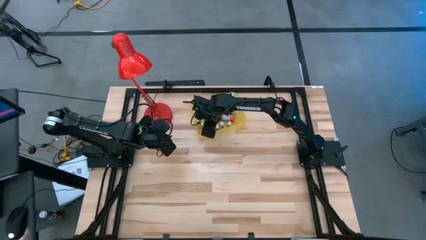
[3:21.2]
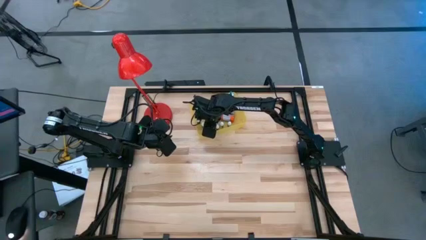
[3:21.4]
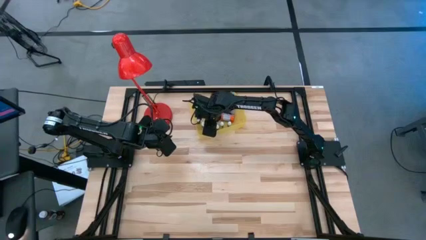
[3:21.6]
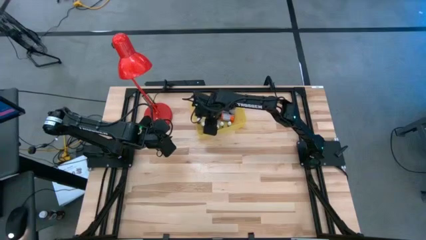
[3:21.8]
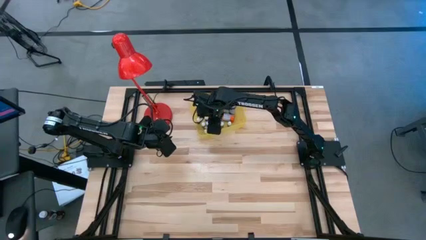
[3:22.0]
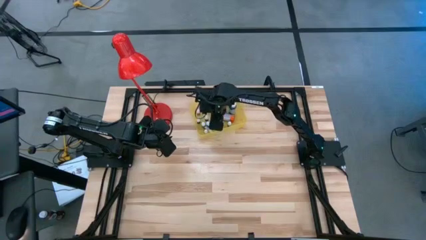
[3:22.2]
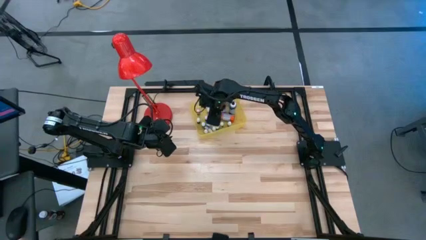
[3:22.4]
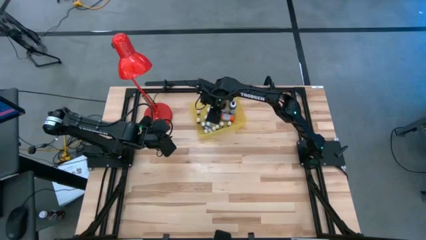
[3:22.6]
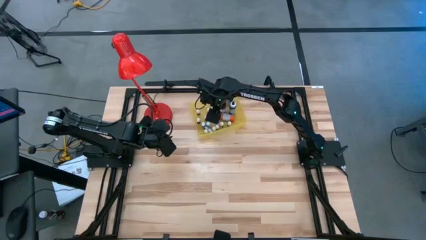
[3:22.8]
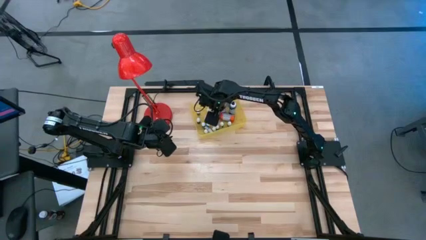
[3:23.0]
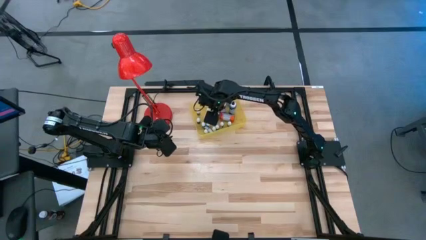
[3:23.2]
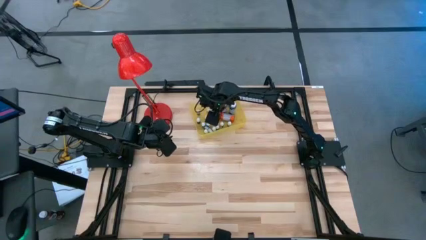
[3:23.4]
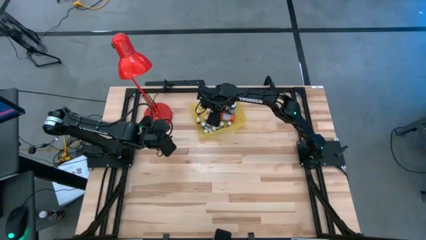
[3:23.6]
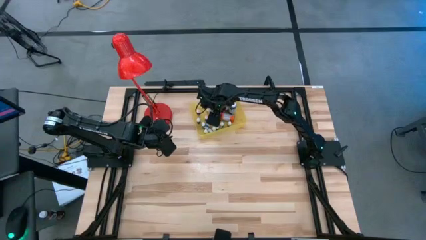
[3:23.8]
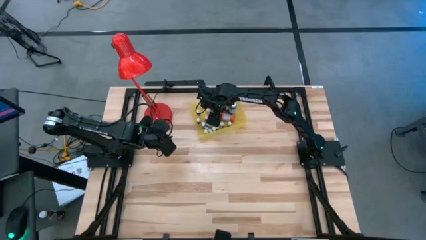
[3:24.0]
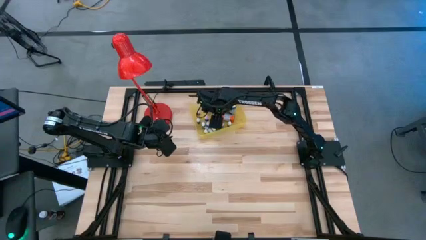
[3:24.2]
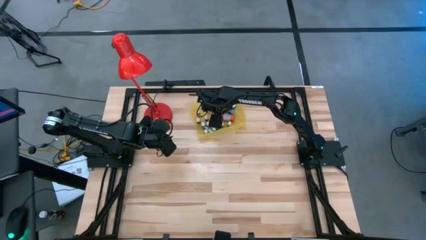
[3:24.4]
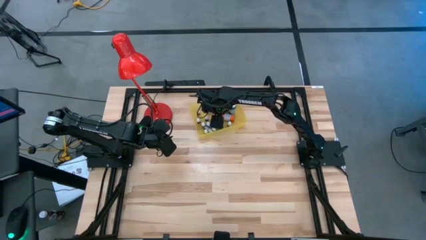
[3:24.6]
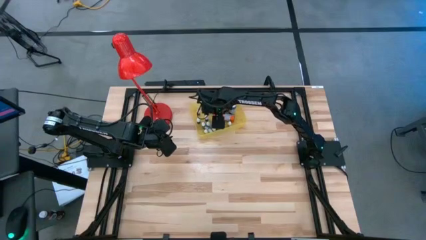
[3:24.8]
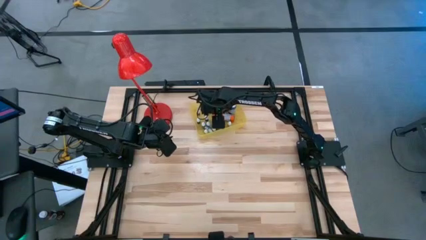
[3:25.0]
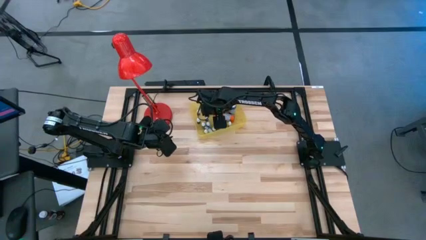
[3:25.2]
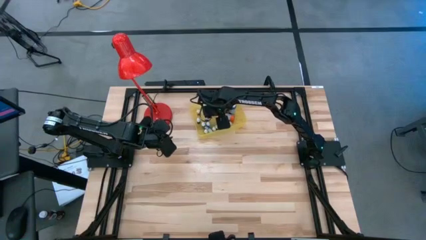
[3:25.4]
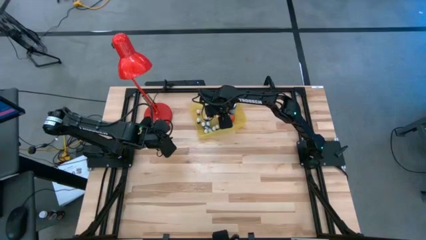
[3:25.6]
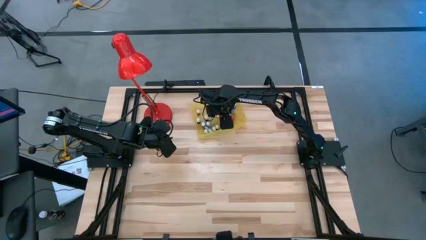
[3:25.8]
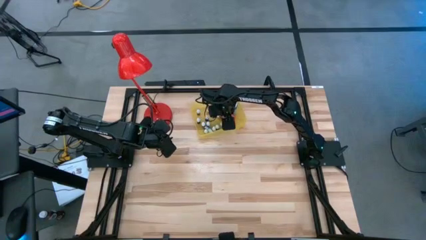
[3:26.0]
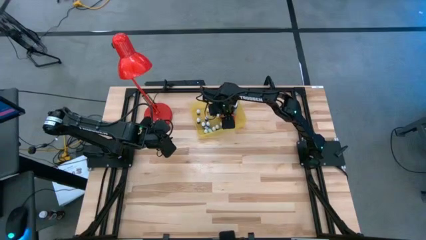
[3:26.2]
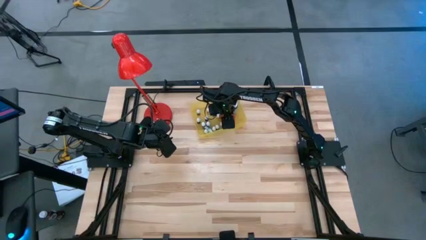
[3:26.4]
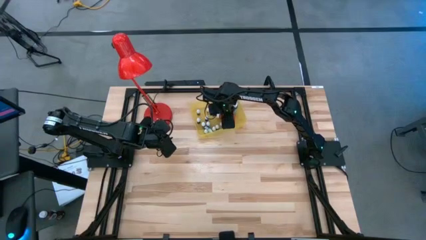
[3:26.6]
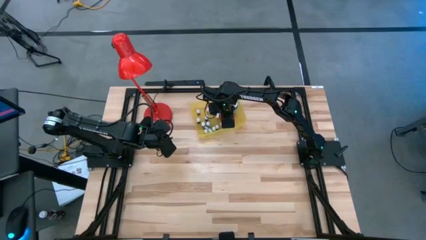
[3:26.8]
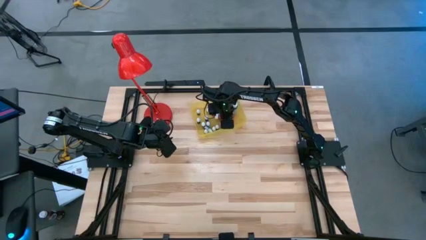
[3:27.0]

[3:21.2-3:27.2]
Task: Pick & Place food coloring
Adjust the large orange food coloring bottle in the yellow bin

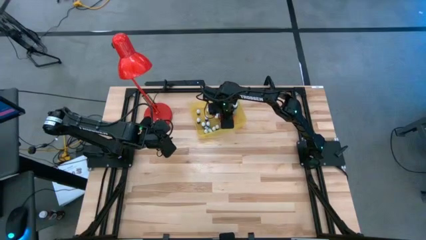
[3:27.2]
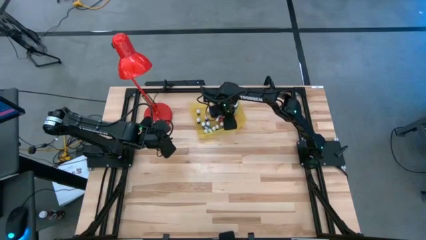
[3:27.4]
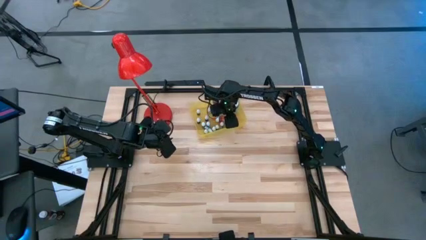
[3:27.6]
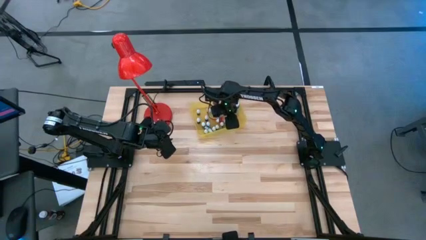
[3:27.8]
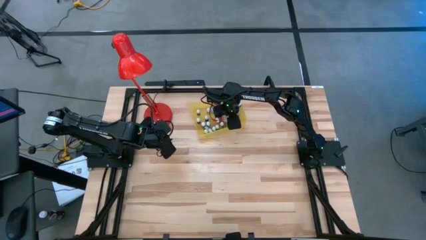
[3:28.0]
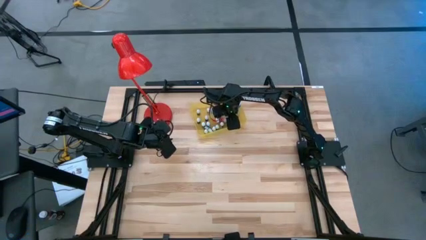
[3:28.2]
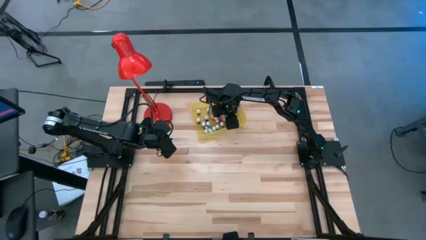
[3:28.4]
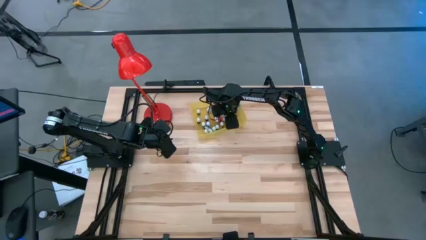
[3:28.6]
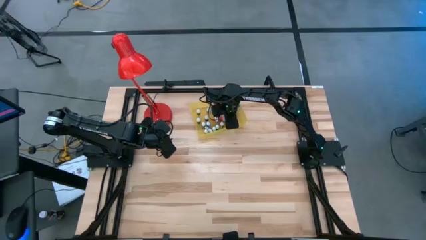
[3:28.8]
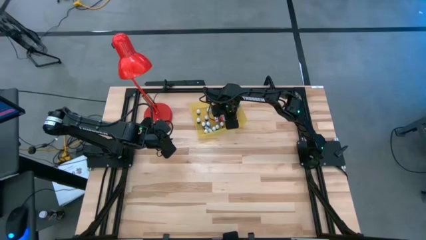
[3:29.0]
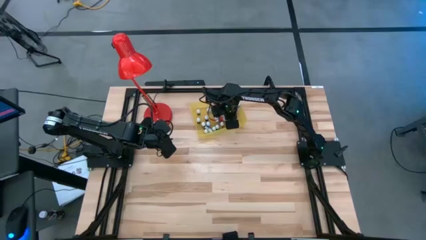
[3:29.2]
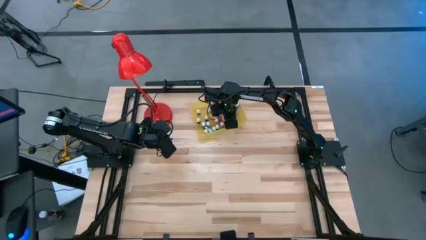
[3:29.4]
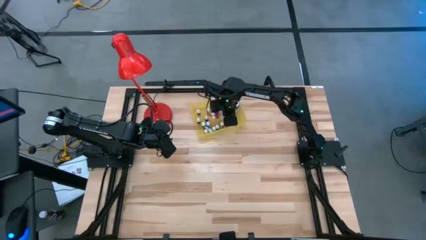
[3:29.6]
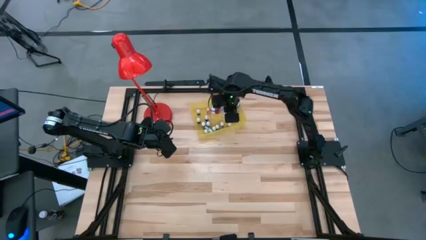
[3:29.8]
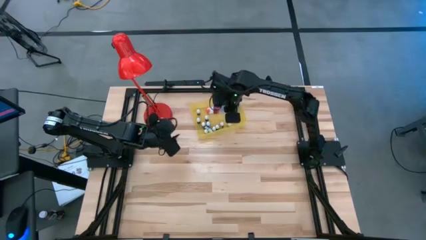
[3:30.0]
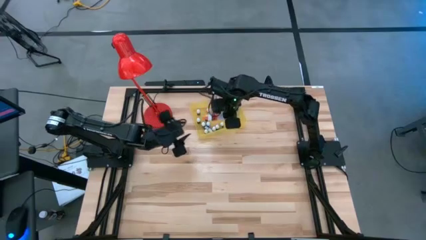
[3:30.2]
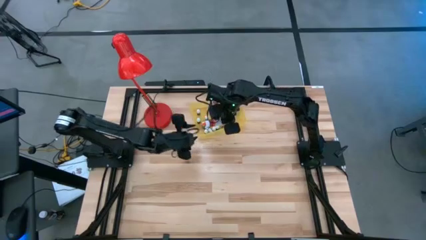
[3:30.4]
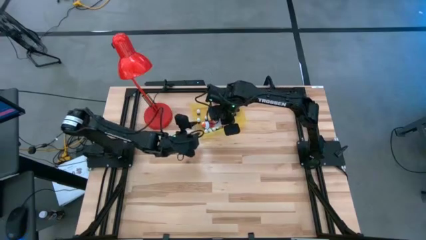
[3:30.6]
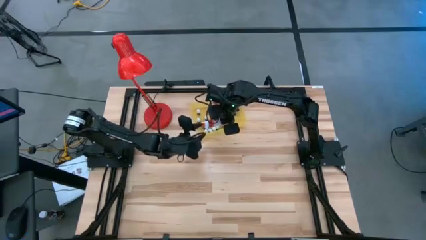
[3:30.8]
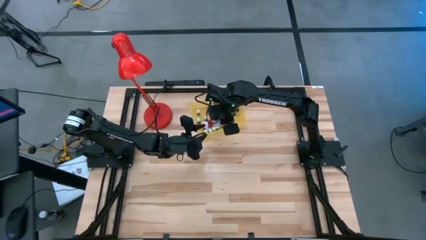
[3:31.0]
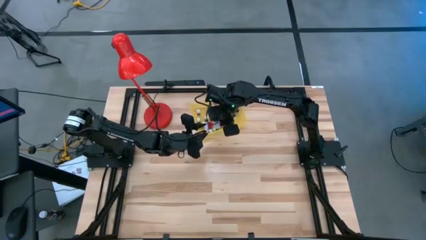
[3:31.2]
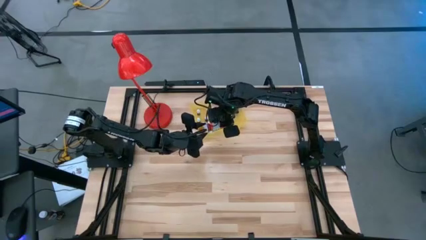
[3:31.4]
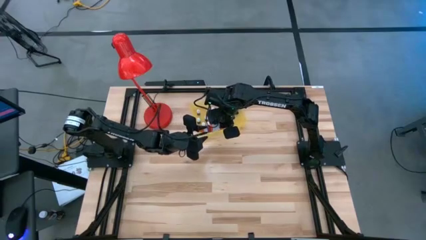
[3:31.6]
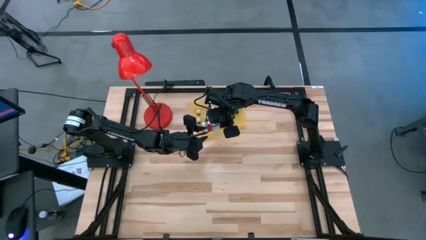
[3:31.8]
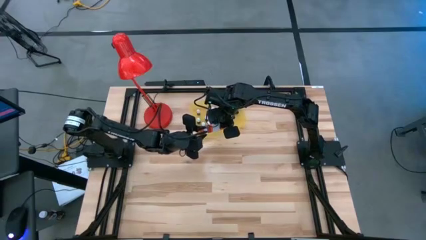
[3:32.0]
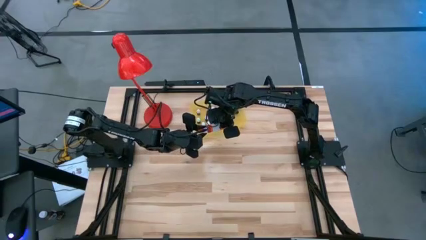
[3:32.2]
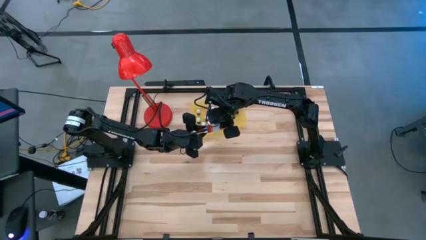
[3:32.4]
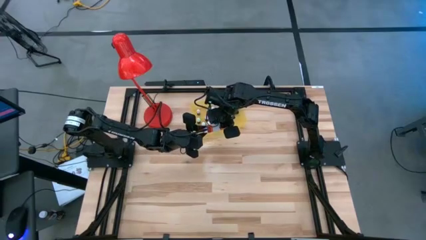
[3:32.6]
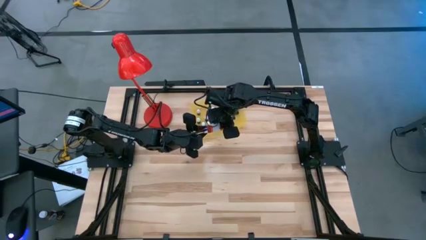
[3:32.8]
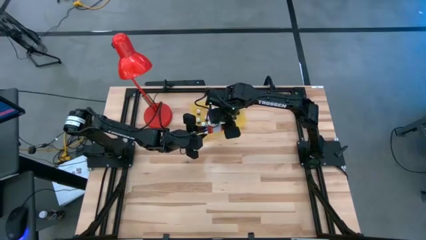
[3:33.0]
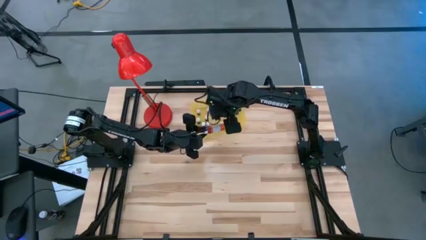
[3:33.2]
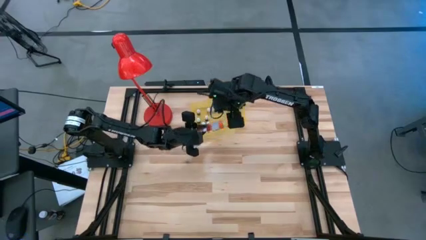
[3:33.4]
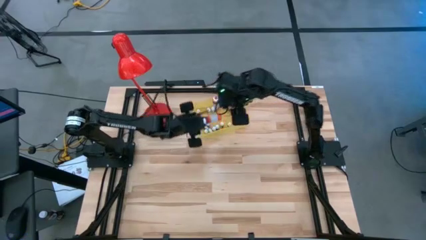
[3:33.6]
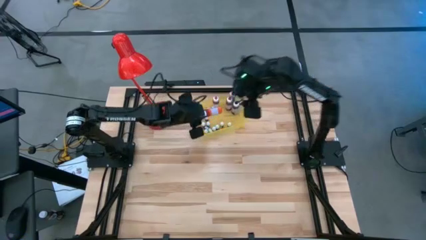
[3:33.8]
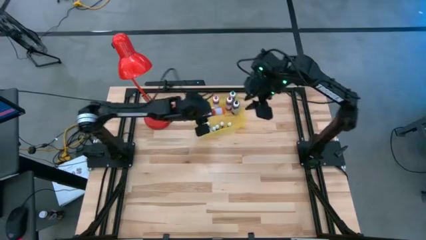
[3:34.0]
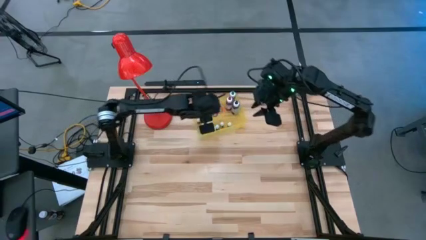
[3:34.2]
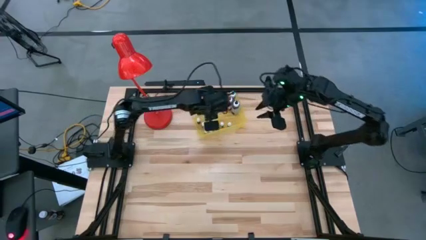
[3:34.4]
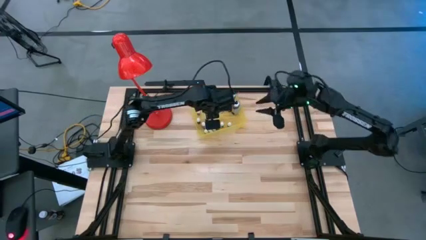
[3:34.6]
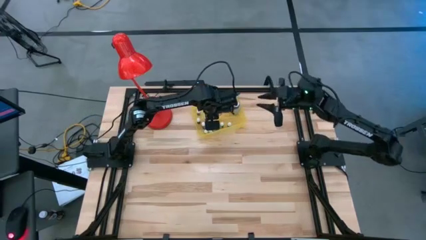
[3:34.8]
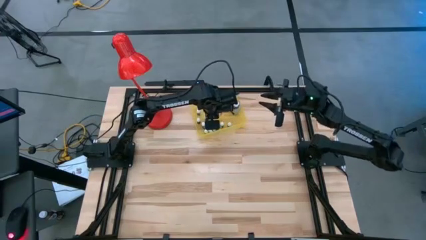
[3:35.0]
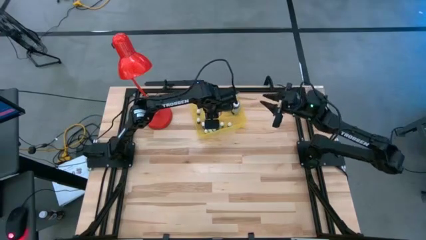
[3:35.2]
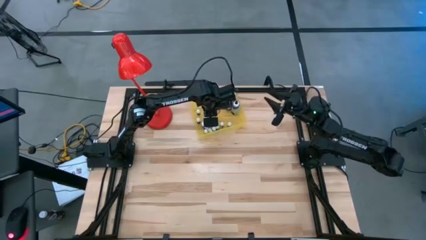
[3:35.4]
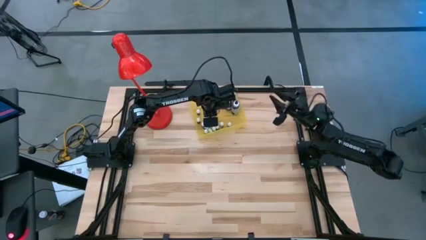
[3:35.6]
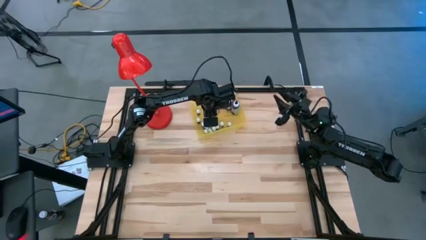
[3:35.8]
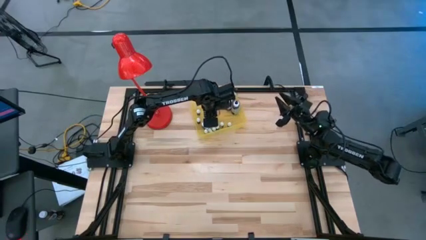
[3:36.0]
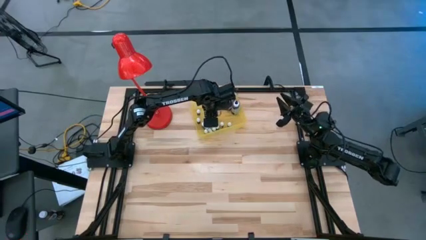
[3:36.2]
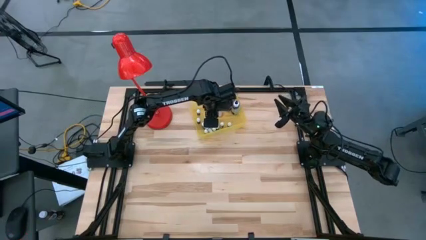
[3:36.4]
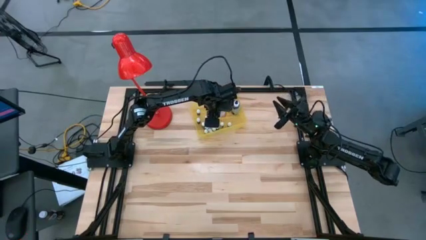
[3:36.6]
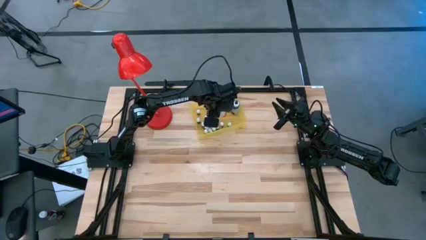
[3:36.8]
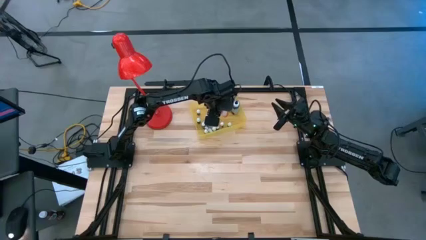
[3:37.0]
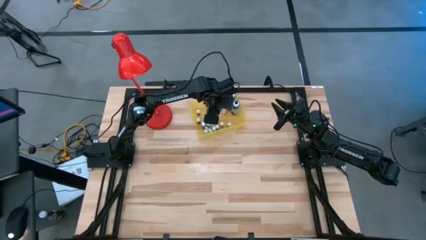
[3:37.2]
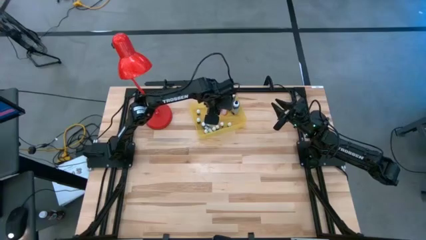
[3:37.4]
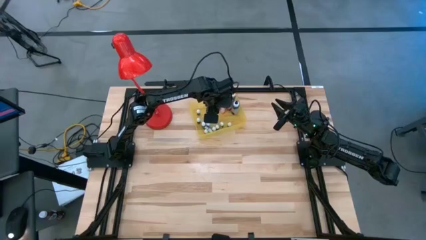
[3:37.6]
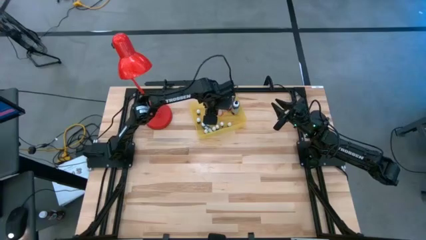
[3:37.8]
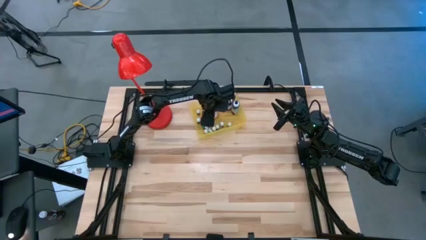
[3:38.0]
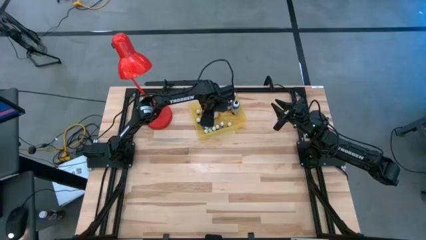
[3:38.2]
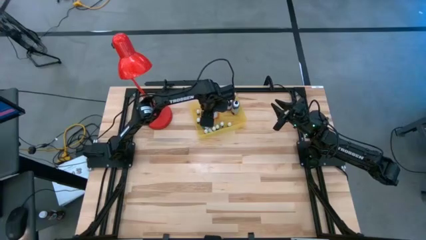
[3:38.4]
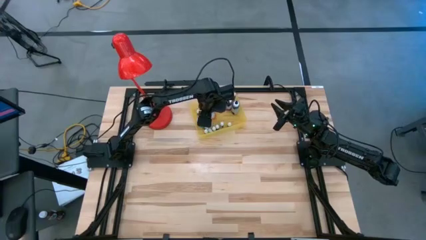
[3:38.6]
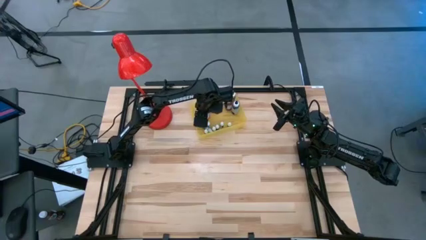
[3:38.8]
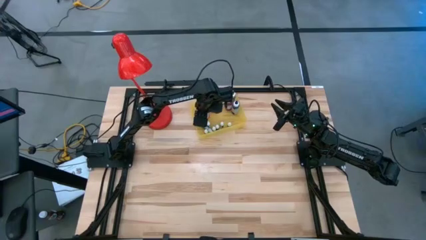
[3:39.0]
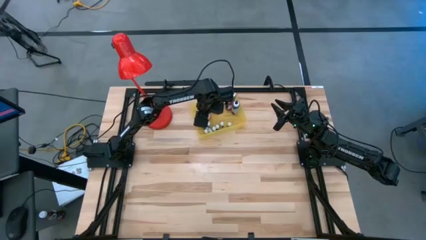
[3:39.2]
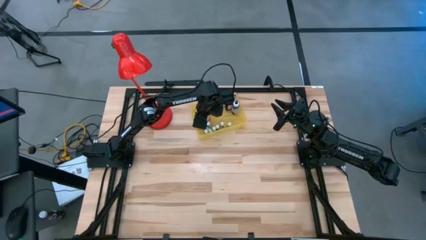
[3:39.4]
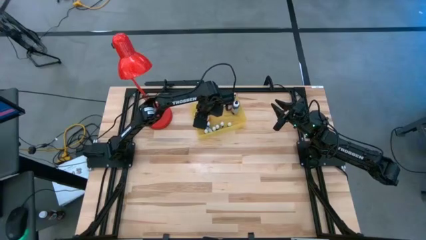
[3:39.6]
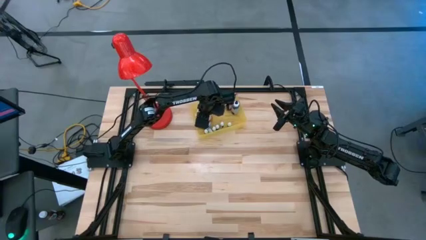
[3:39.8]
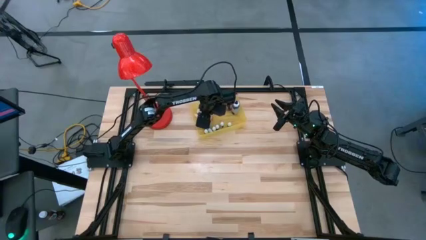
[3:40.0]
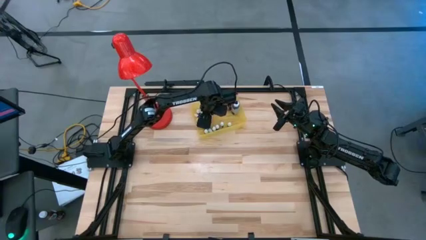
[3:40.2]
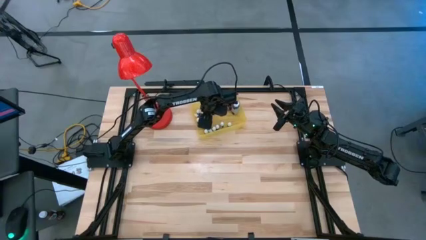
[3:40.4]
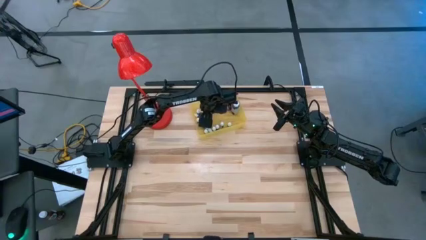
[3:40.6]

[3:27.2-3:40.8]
Adjust the large orange food coloring bottle in the yellow bin
